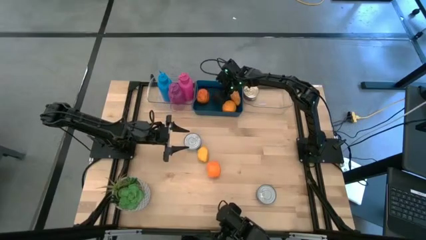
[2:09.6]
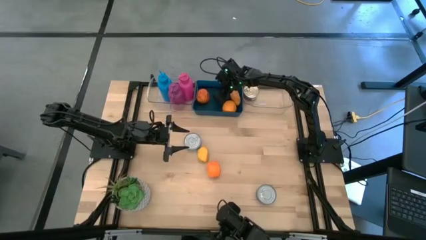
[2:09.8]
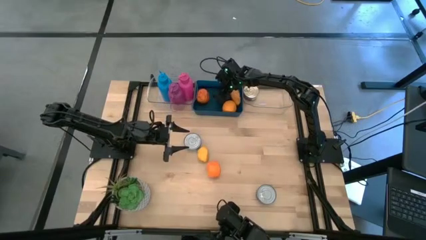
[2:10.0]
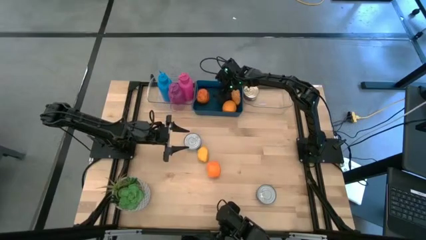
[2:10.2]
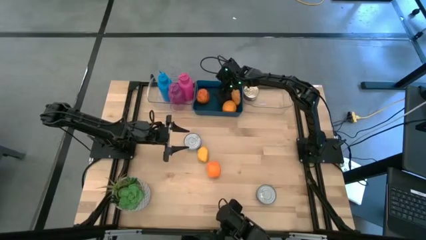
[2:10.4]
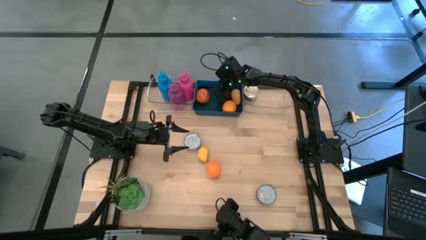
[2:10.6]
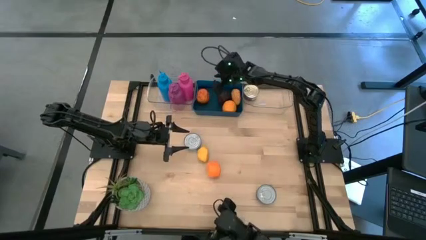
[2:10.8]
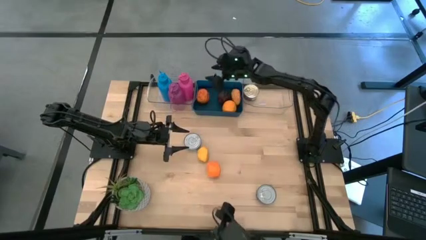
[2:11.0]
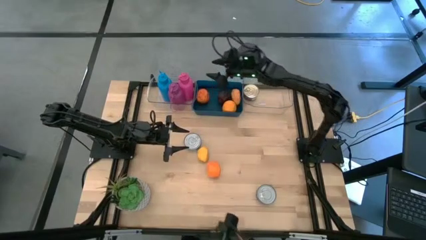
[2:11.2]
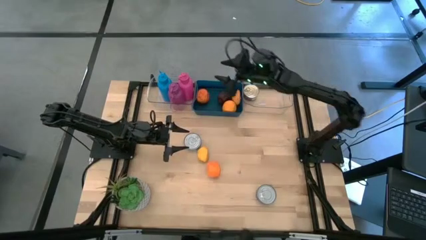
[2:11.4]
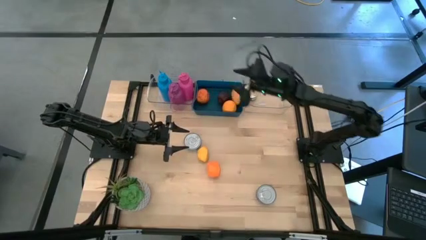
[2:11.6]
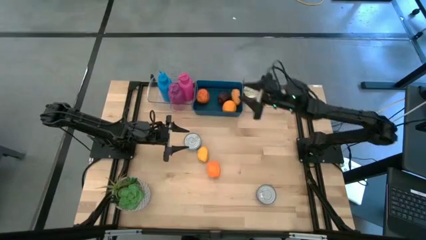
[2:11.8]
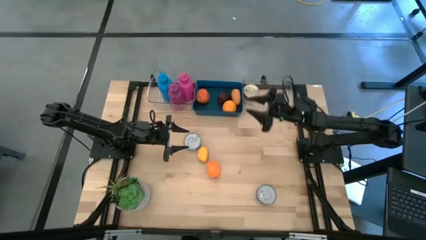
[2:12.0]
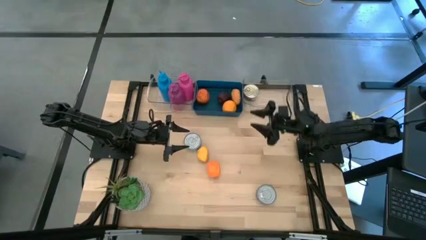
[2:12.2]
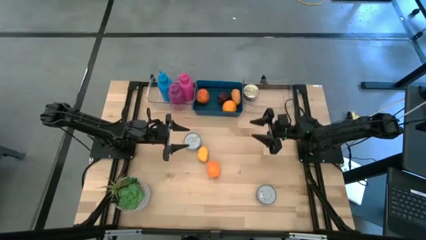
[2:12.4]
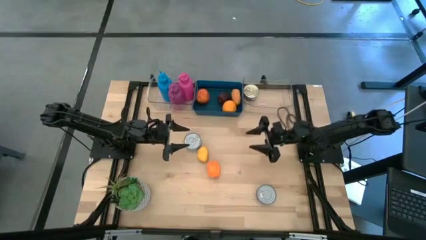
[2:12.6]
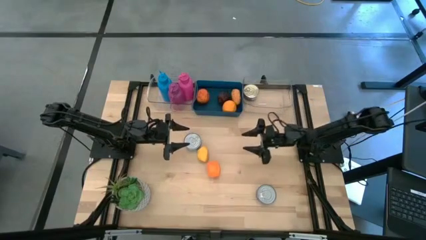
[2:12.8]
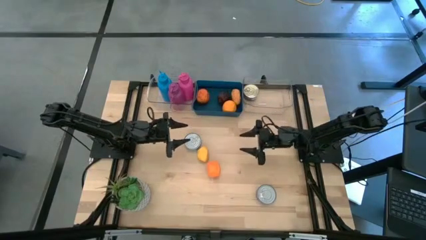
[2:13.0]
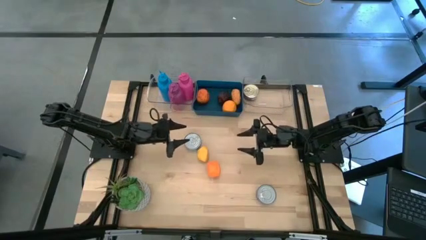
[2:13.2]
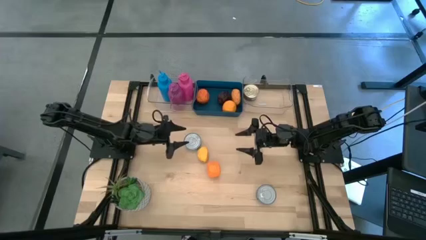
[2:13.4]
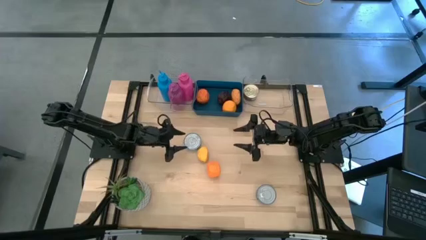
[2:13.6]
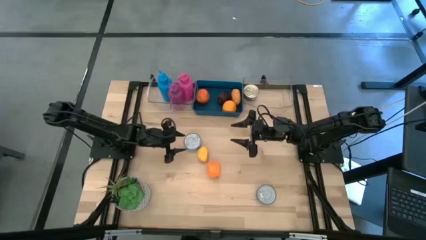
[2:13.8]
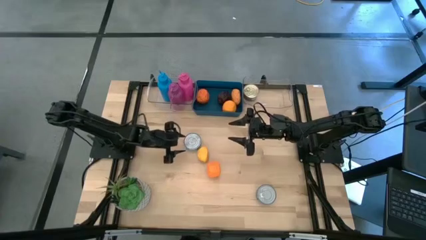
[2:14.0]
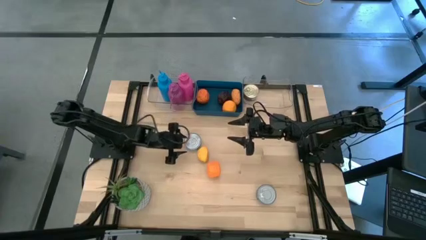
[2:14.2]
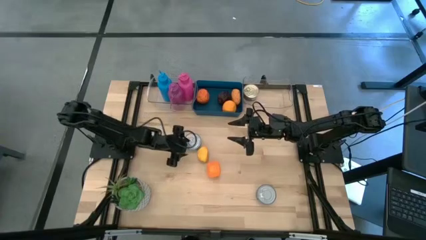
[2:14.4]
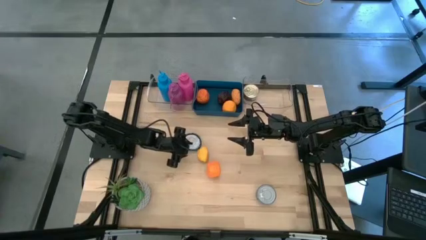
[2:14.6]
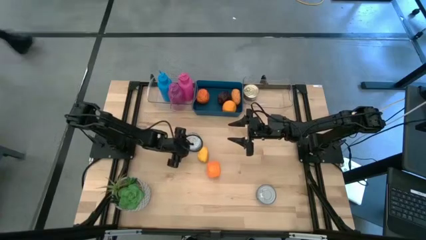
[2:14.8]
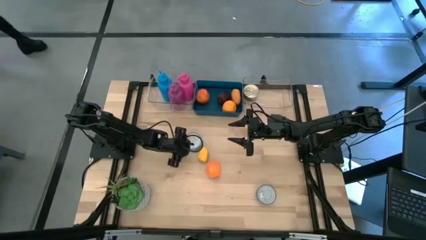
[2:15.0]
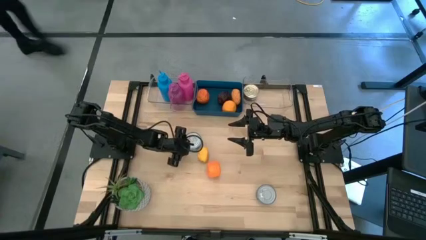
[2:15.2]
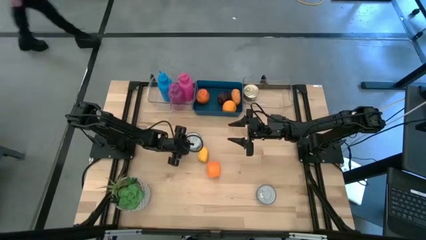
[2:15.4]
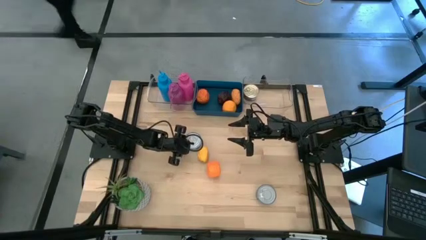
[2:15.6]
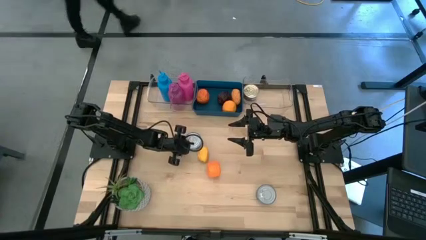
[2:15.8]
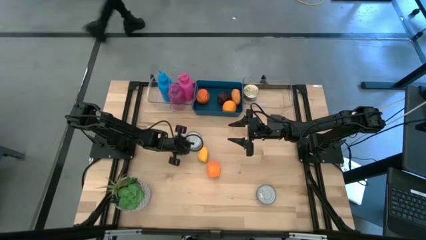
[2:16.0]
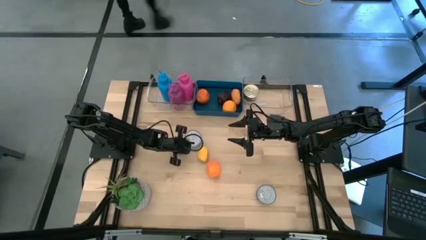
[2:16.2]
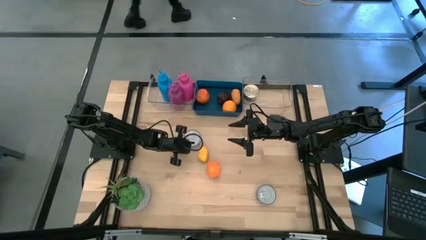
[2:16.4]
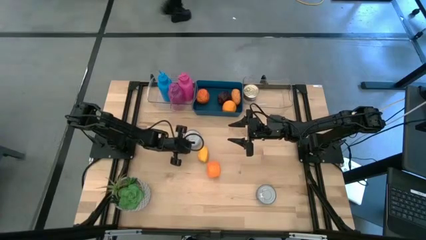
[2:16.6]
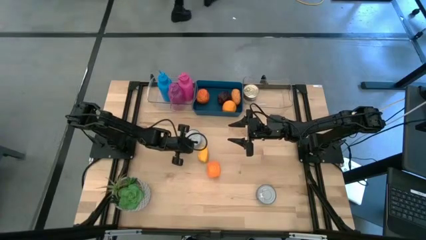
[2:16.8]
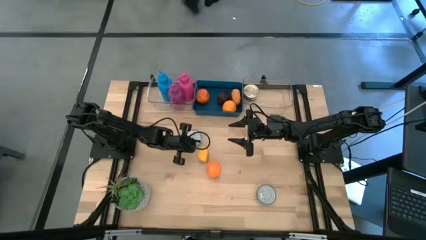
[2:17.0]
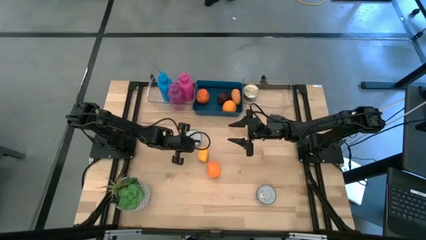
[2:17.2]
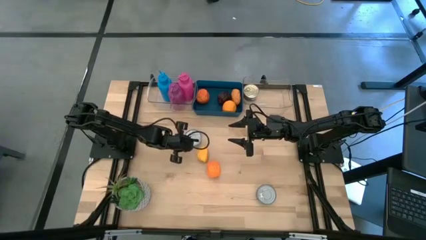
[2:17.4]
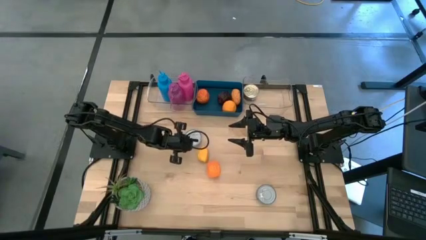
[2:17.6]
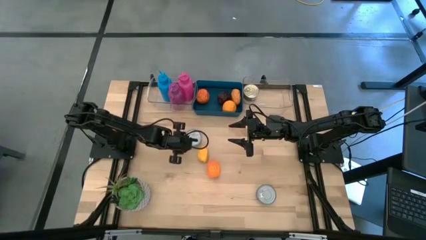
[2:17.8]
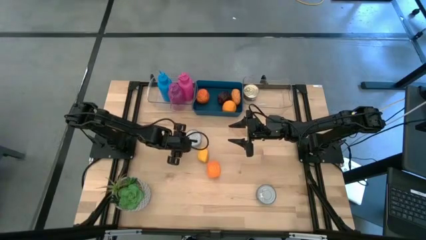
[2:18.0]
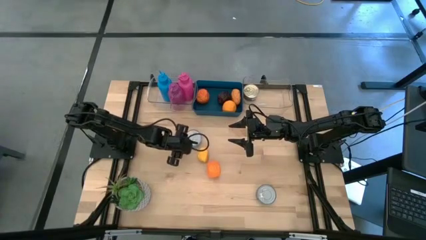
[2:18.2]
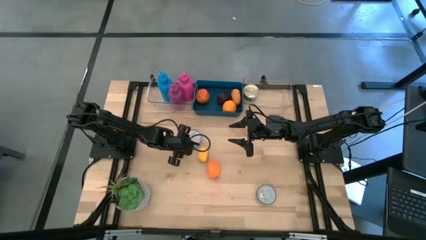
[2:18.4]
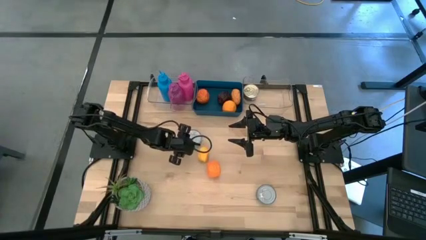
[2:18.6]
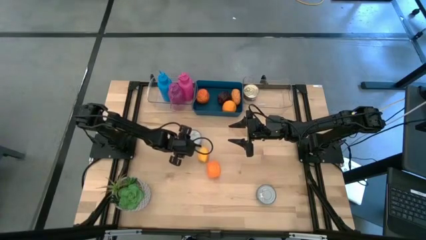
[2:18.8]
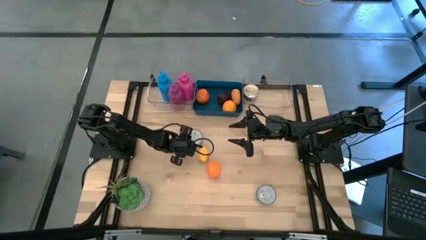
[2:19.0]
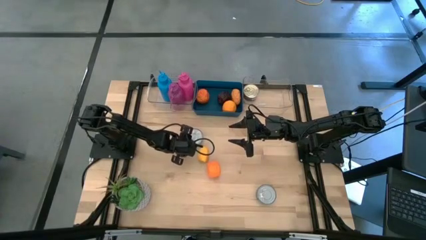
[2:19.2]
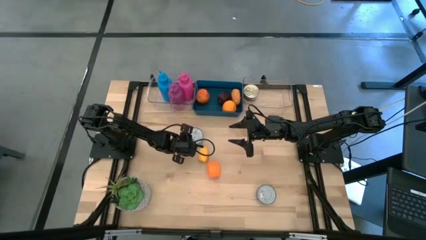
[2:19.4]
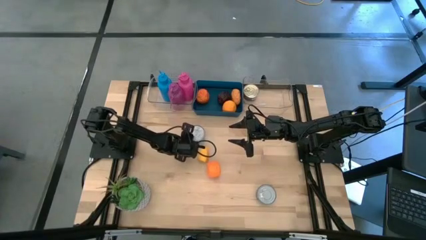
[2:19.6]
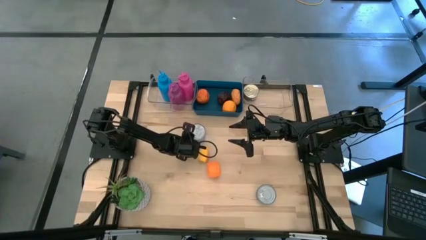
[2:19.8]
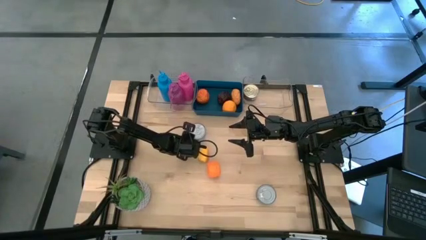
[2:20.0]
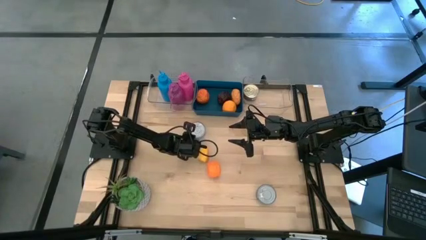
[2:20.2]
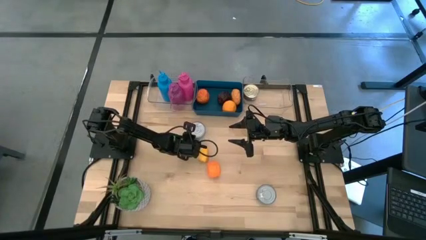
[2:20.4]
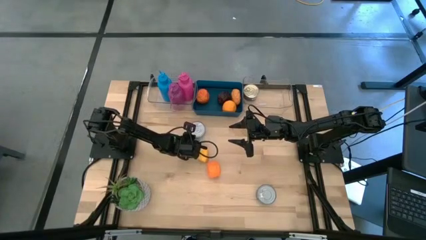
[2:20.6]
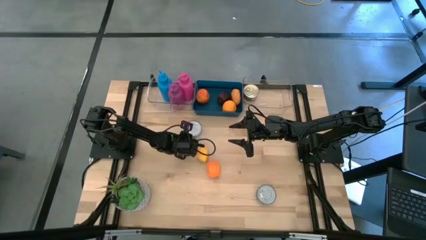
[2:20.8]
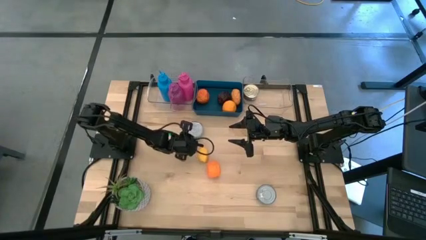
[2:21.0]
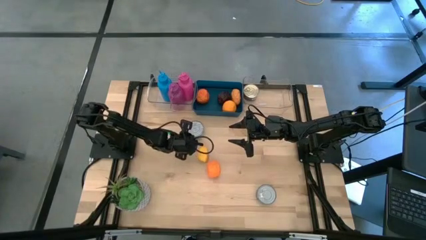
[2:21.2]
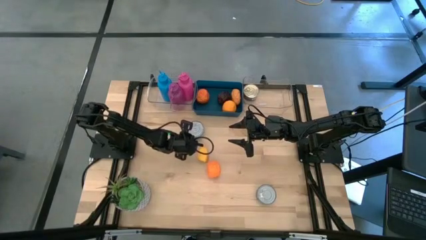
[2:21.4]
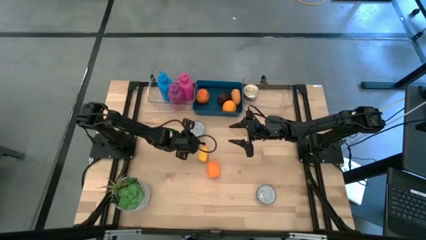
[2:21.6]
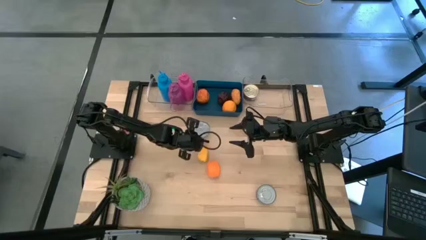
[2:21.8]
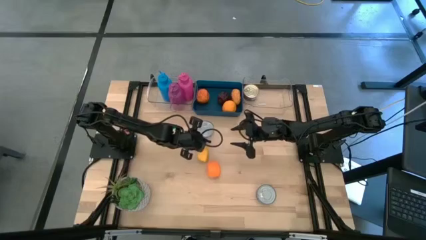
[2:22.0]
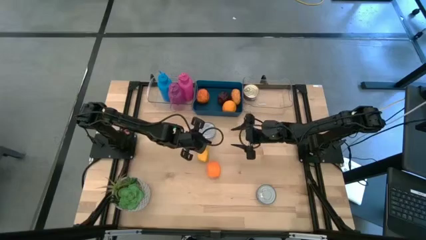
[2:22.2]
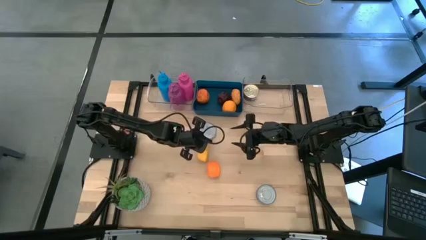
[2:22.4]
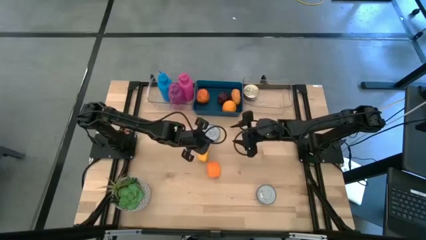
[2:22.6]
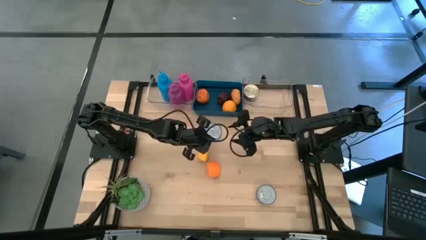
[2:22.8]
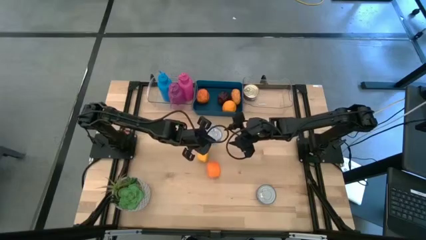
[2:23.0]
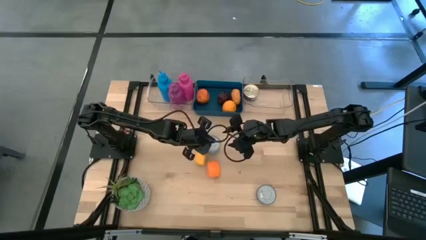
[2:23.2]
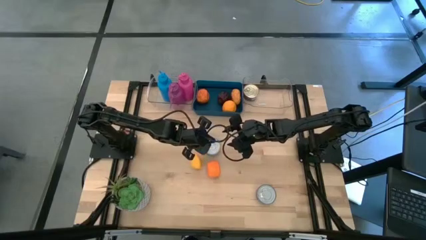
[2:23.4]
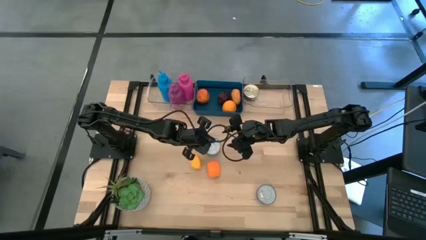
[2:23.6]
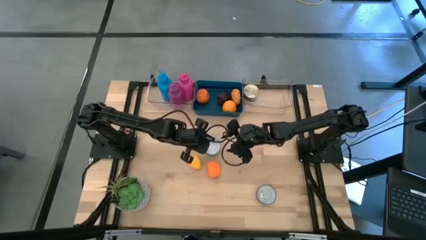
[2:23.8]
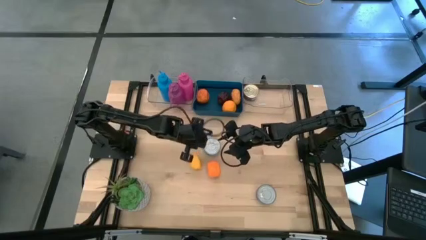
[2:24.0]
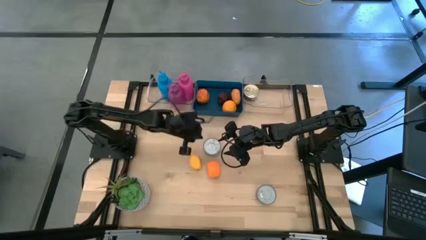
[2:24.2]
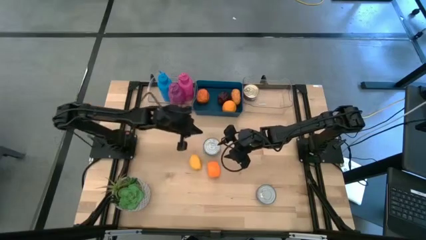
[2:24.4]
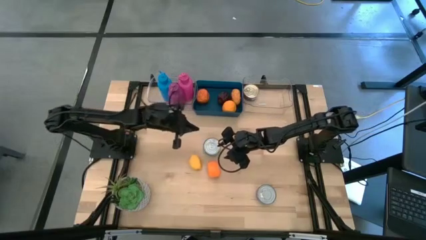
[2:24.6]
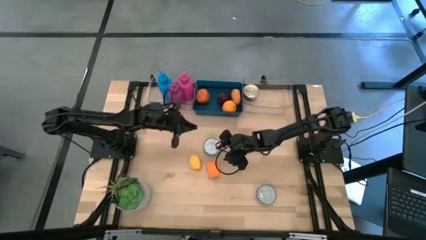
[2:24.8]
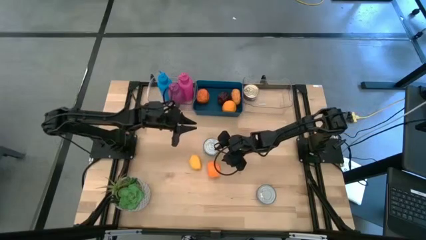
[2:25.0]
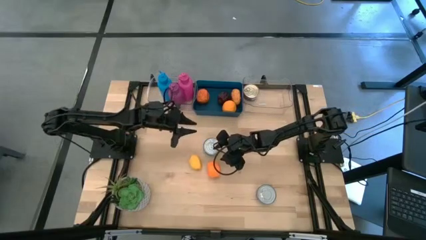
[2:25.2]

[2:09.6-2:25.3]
Task: Pick & Place Food Item
Stack the yellow blue can on top of the blue pink can in the right transparent bin
